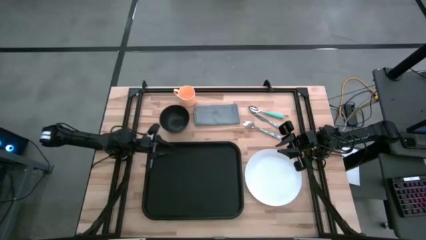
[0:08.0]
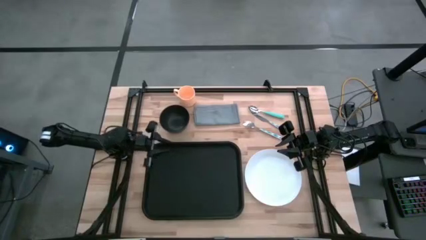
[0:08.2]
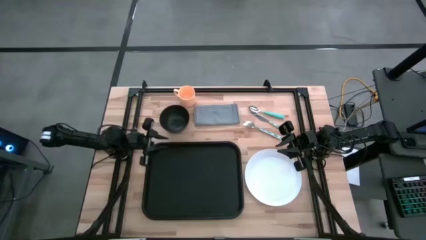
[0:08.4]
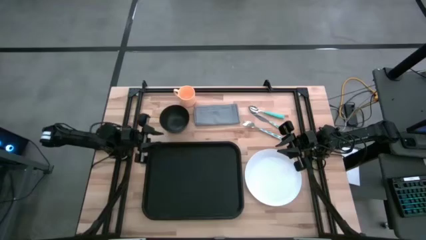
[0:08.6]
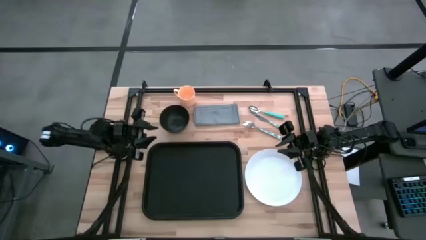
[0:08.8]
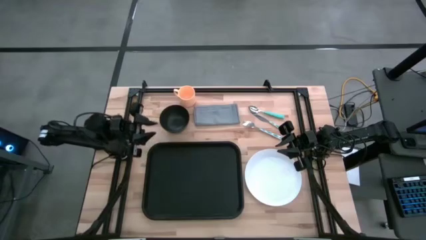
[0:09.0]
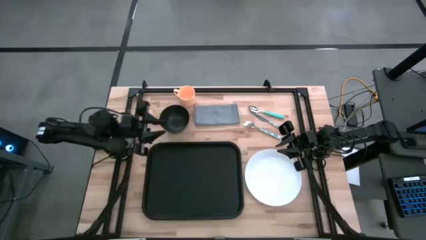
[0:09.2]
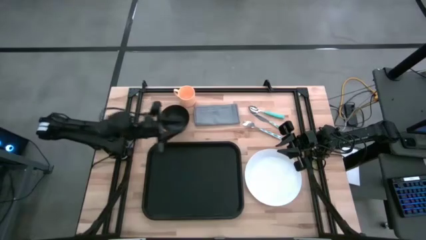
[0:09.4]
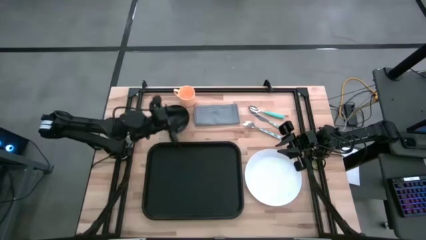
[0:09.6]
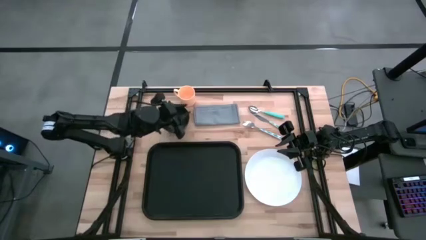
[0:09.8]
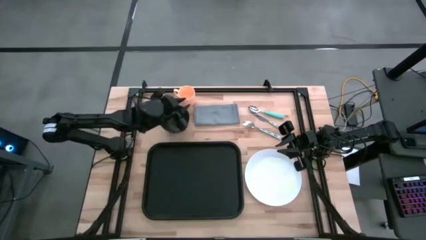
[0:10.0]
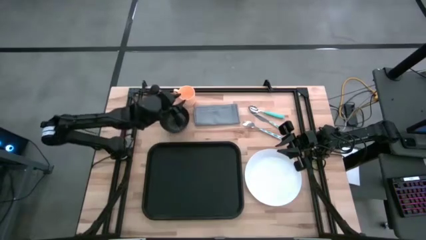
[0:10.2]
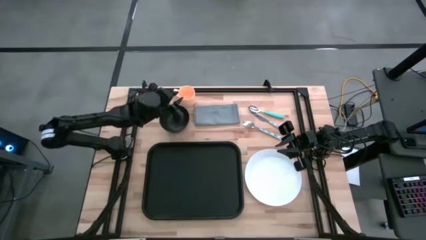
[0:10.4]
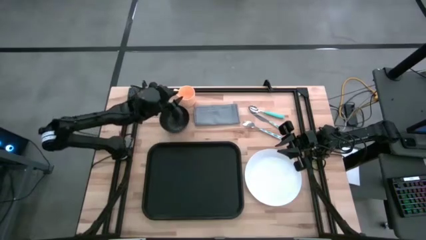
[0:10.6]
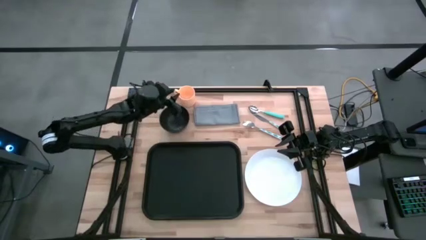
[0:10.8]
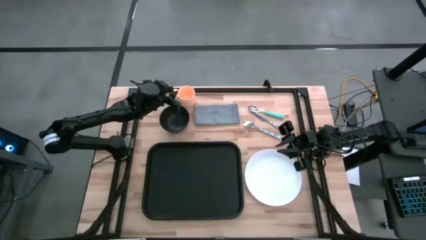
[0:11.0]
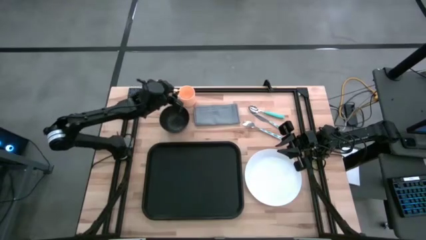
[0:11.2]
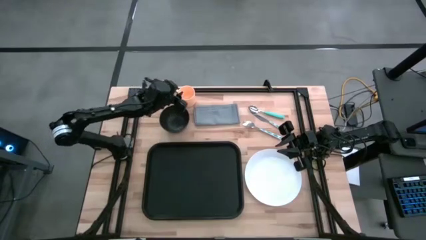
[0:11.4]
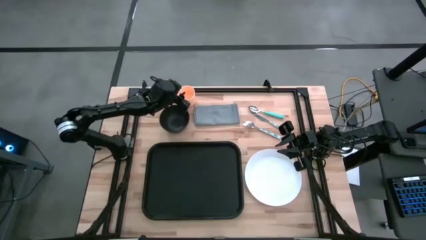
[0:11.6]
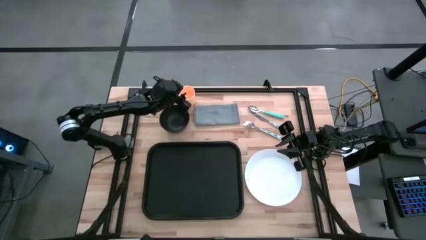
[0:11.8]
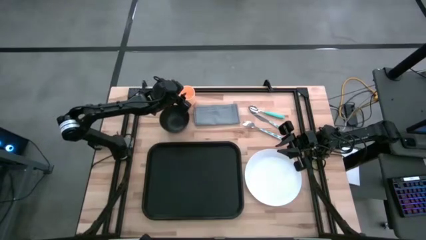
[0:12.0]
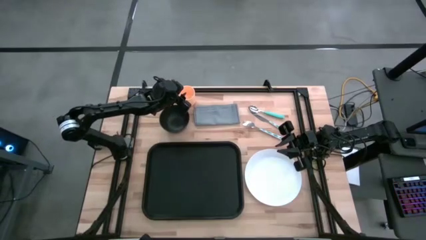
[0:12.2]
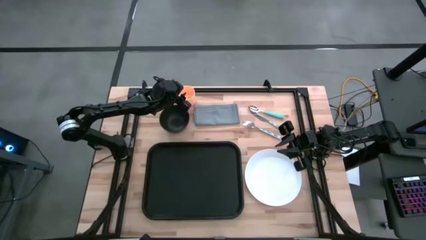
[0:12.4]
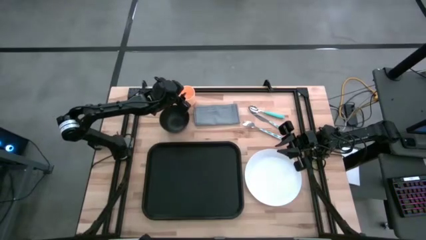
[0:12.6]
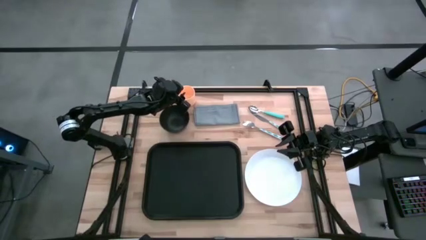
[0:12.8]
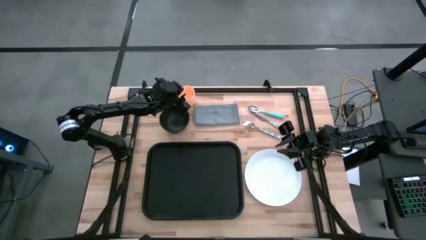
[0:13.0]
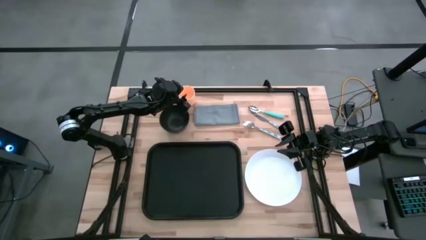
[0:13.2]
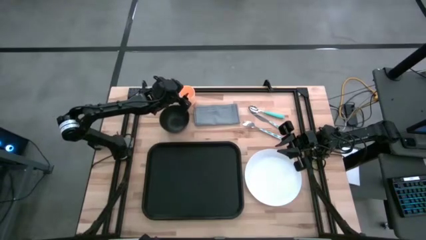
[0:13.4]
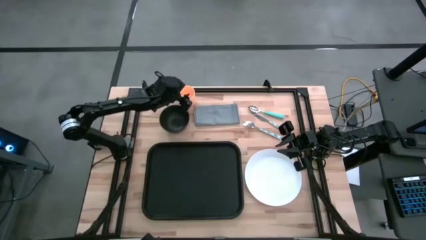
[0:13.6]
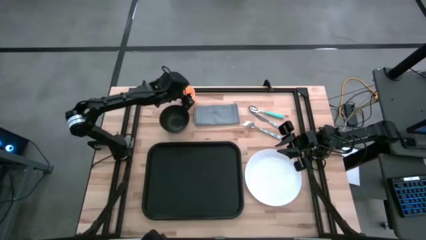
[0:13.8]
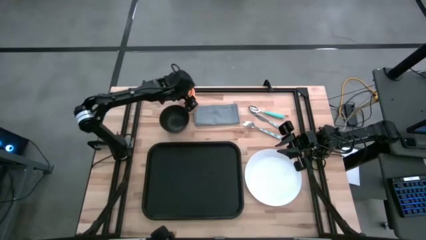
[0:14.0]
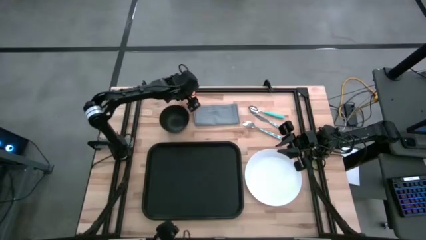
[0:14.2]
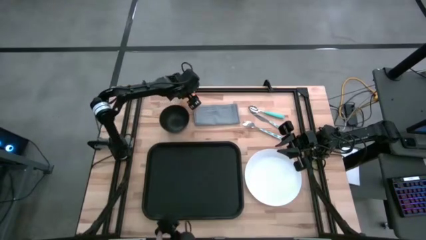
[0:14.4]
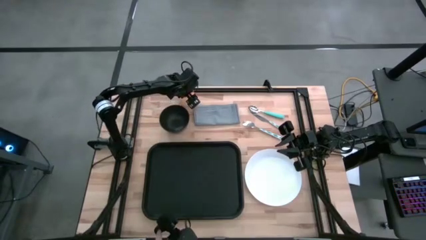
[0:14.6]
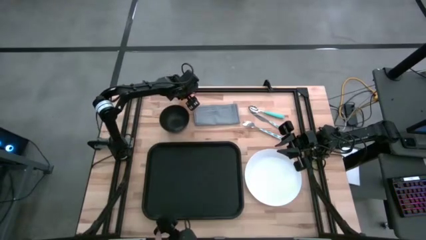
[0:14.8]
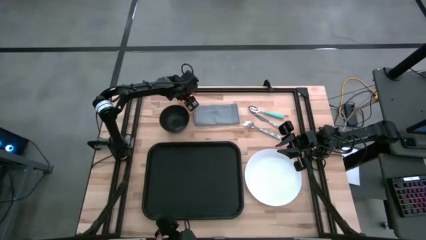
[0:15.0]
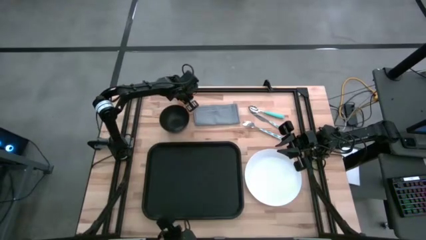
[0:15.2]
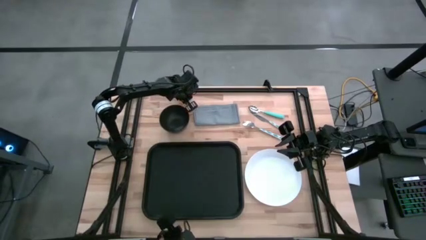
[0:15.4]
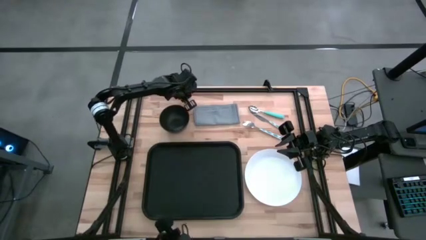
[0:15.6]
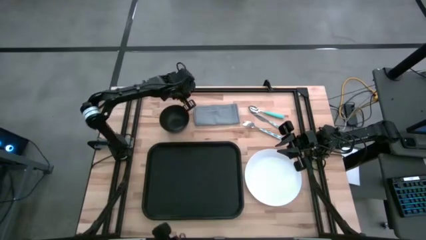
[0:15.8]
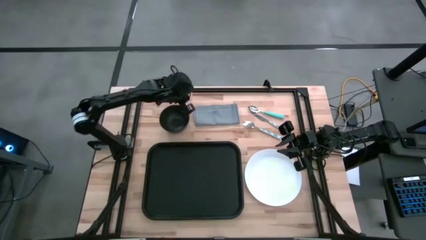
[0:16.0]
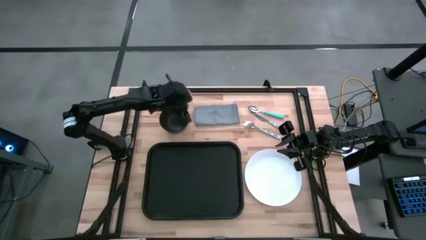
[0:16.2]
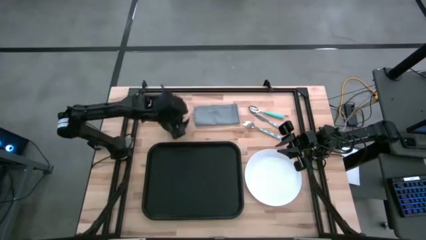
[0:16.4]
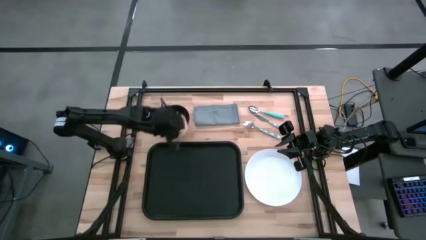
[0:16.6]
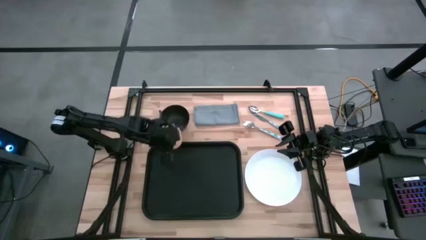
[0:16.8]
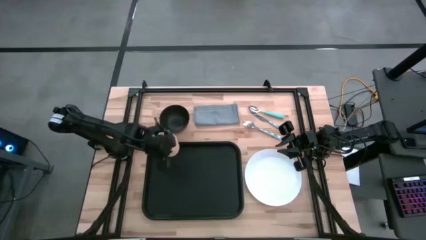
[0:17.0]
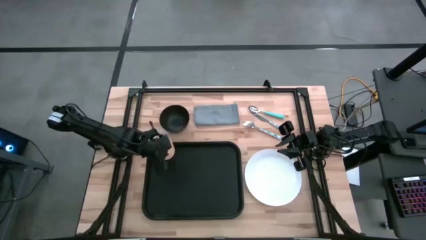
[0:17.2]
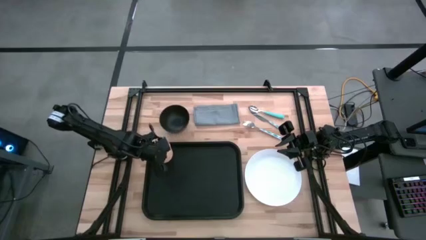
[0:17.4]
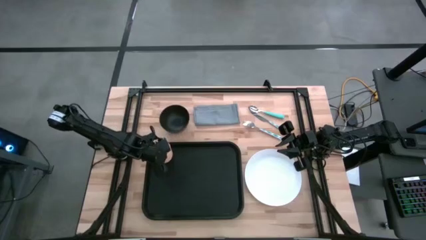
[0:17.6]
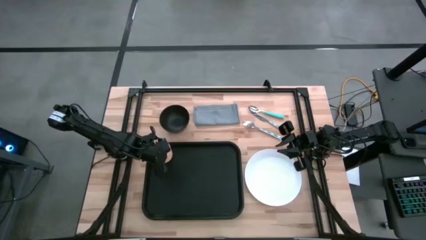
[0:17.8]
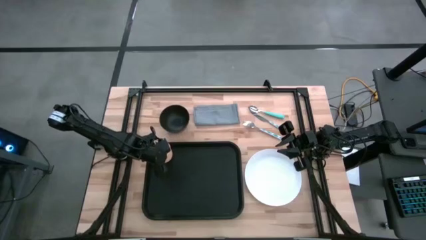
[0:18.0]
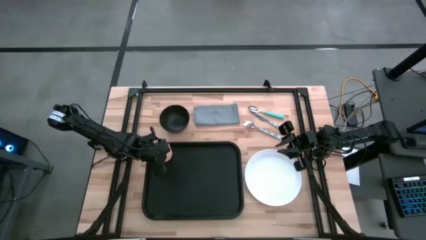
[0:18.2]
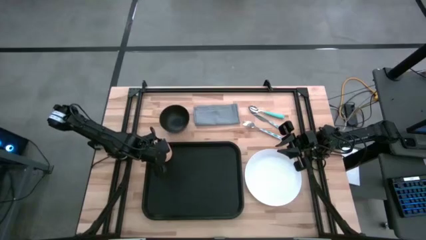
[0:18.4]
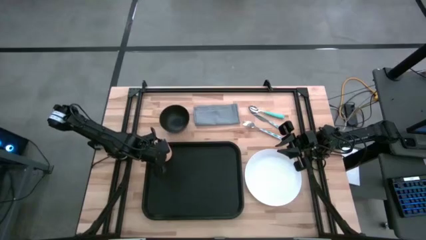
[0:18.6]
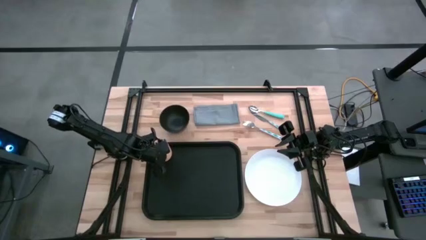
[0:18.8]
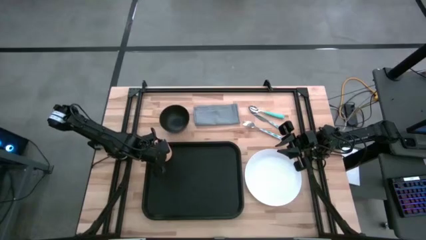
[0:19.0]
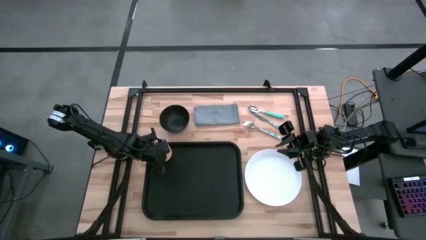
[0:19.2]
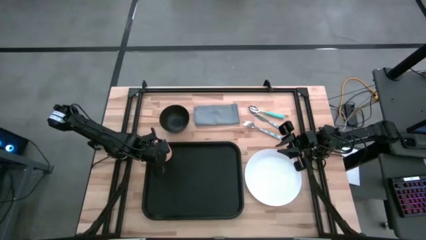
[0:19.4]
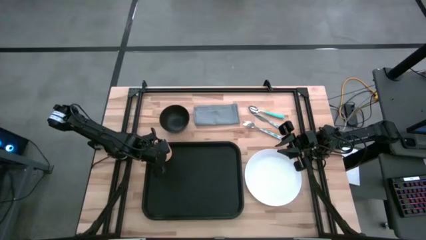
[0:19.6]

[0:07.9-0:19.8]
Task: Set up tray
Put the light orange mug on the black tray

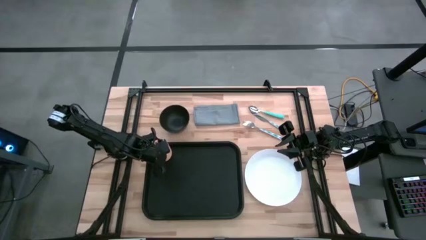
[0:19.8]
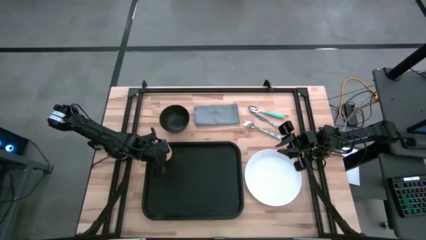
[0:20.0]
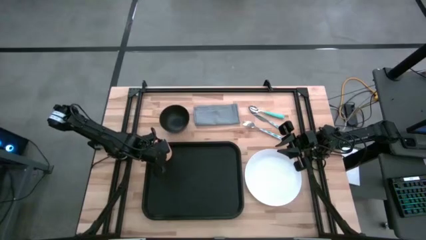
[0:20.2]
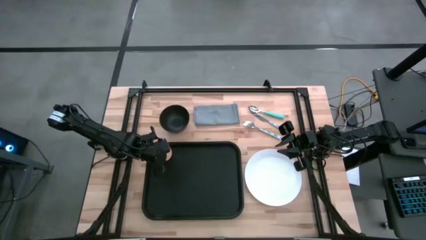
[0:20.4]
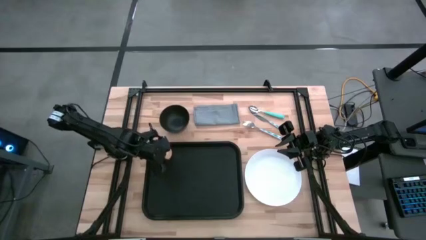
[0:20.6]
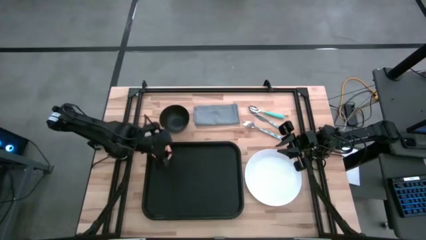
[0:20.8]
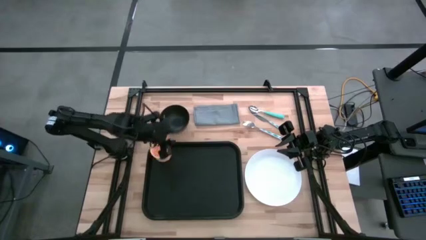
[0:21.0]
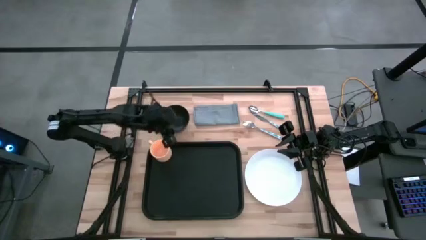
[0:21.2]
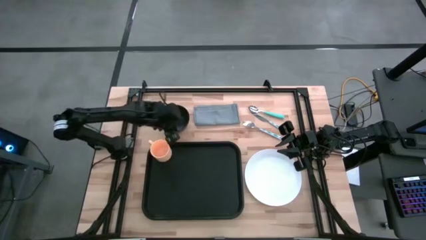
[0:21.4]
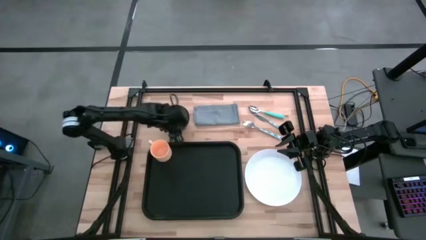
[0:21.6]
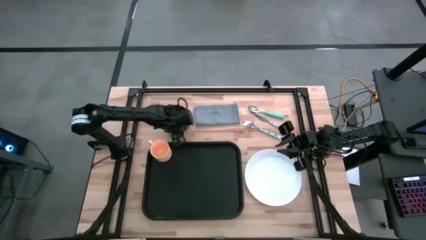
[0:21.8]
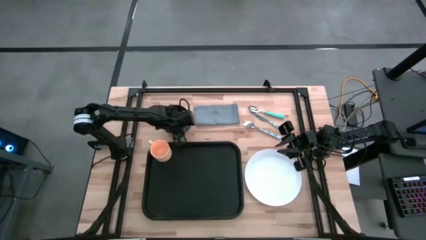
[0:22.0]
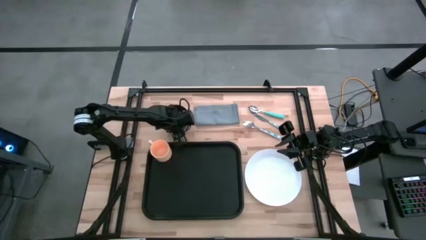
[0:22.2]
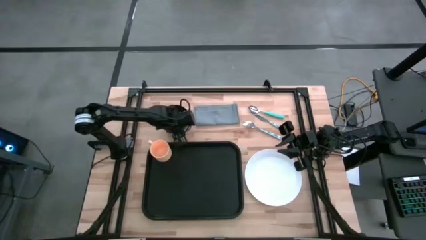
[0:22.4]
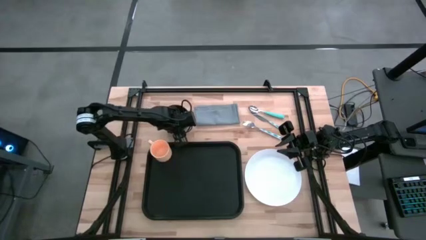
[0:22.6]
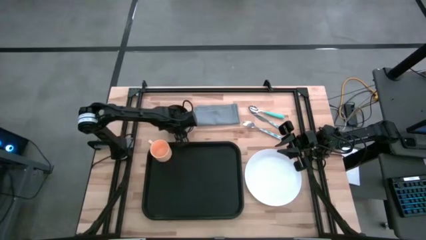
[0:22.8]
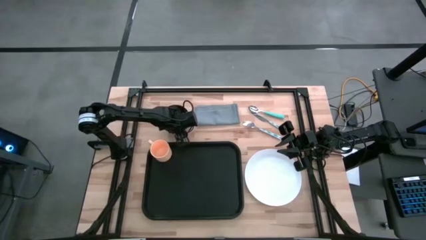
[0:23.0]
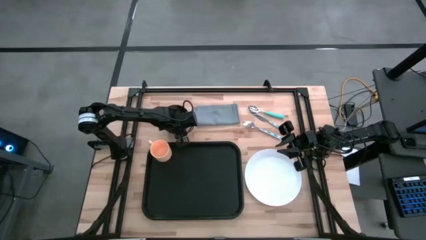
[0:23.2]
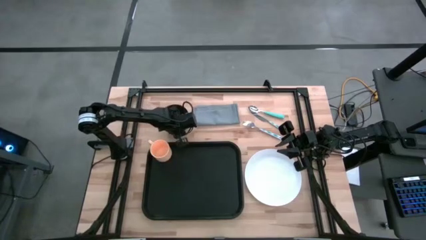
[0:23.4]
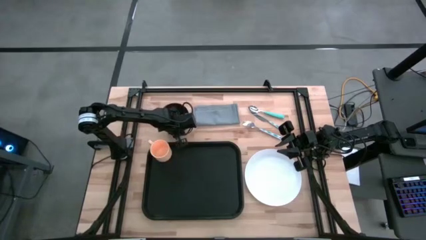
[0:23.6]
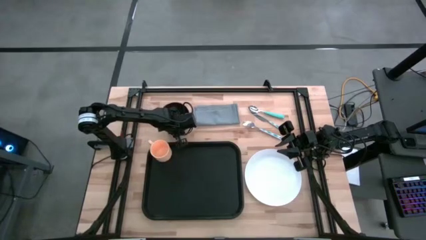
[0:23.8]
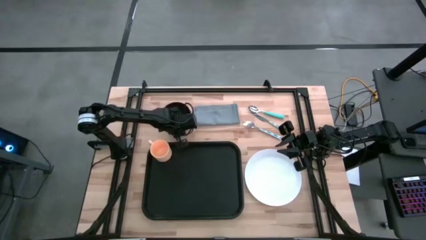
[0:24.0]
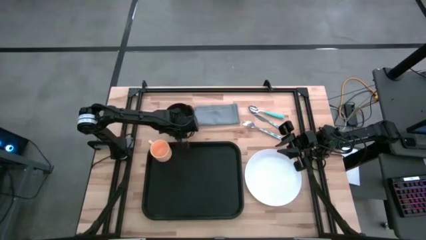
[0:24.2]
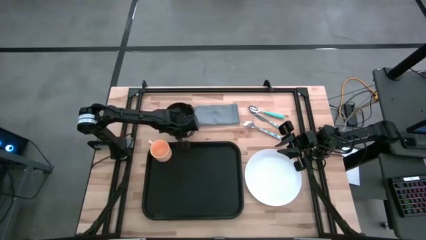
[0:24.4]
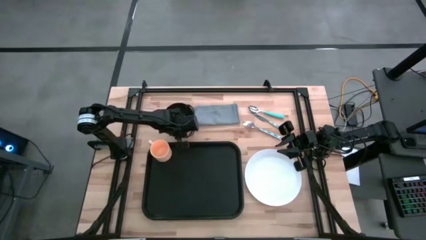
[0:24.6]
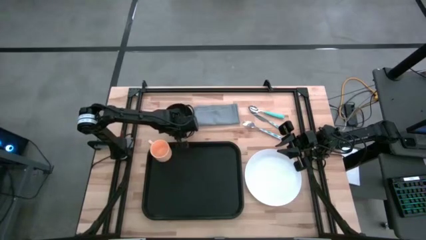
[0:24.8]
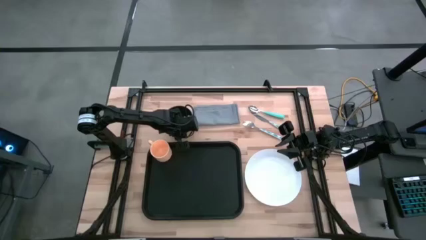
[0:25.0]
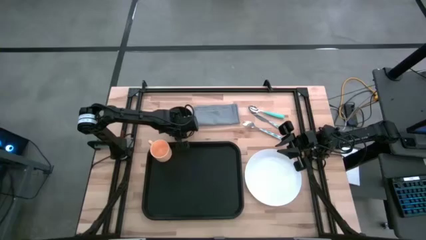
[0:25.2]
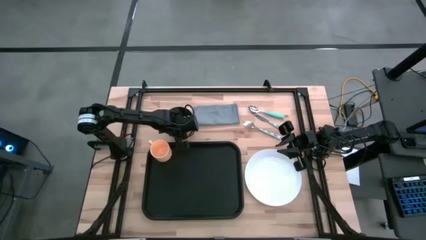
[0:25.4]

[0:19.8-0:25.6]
Put the black bowl on the white plate
